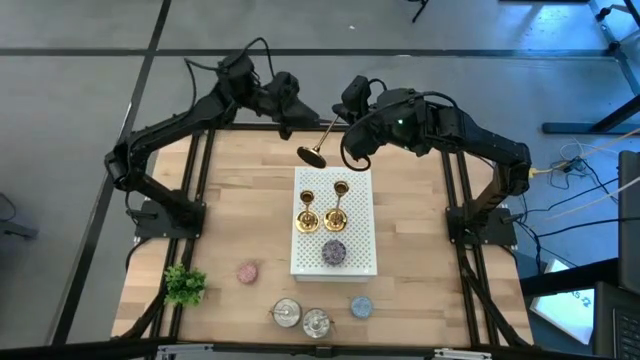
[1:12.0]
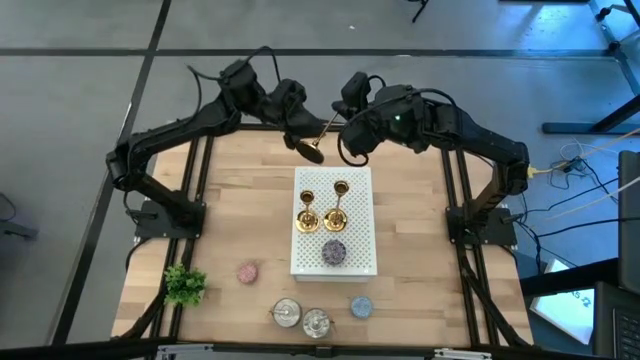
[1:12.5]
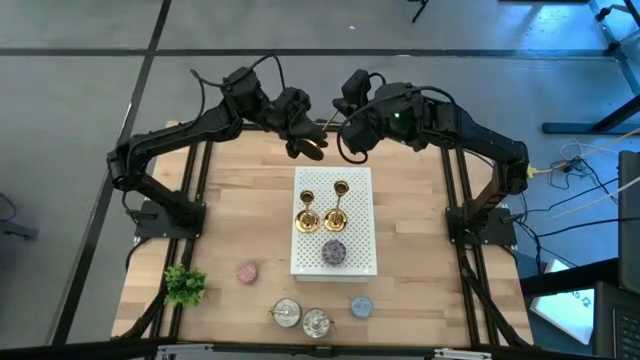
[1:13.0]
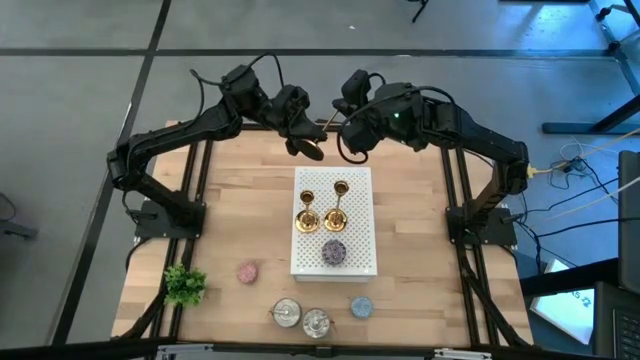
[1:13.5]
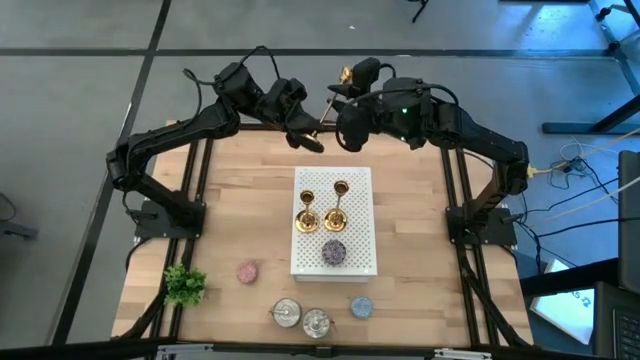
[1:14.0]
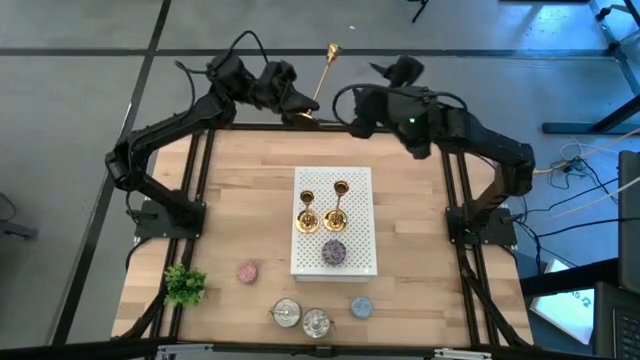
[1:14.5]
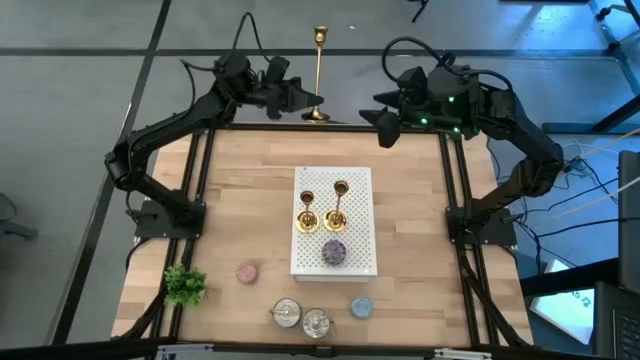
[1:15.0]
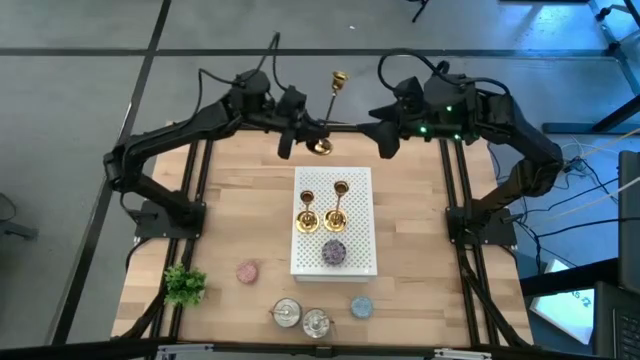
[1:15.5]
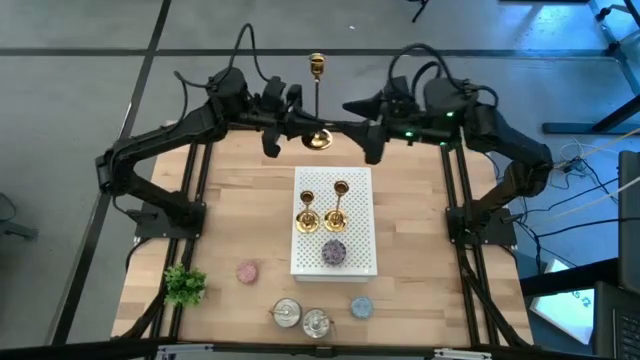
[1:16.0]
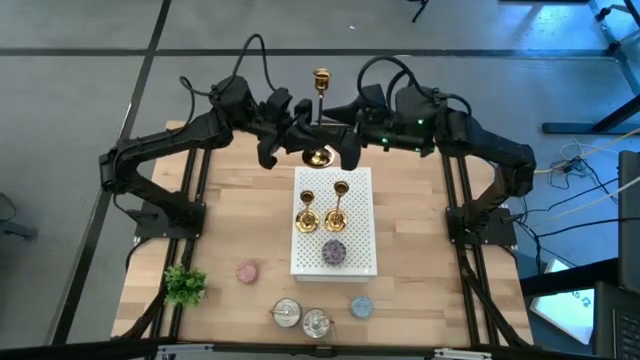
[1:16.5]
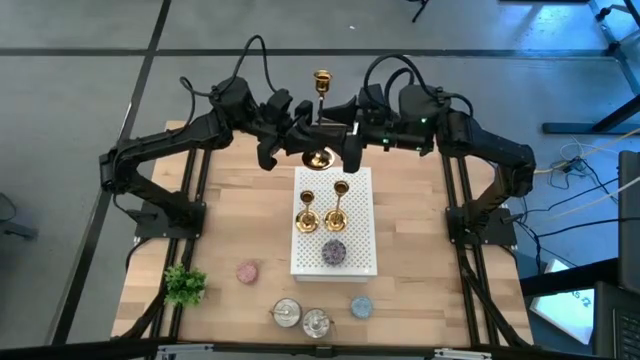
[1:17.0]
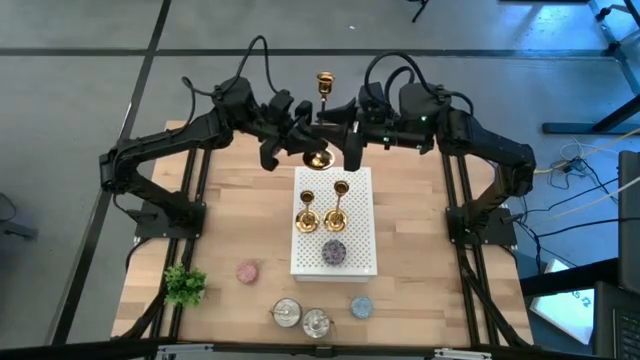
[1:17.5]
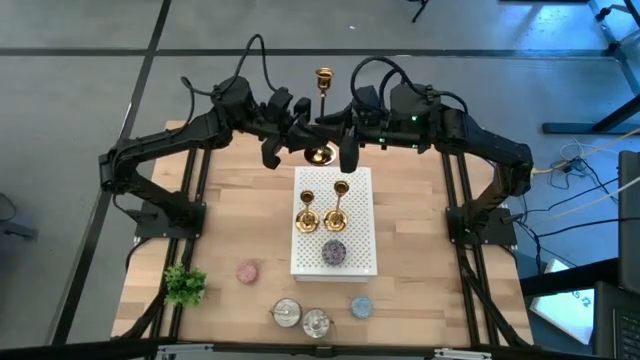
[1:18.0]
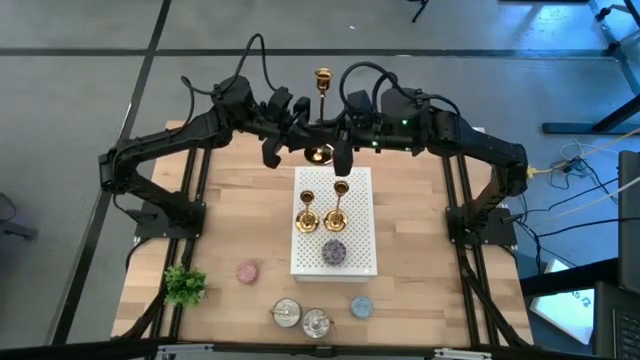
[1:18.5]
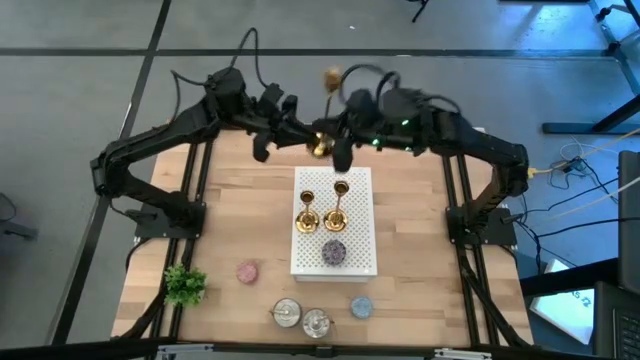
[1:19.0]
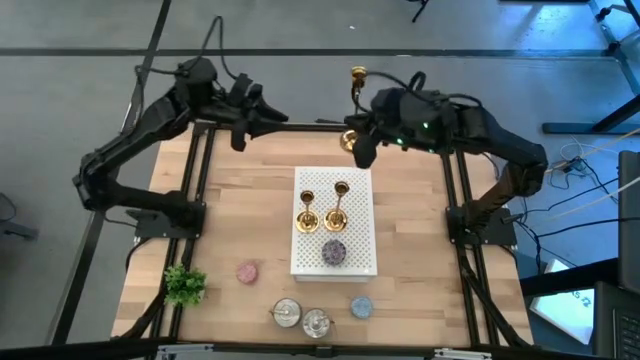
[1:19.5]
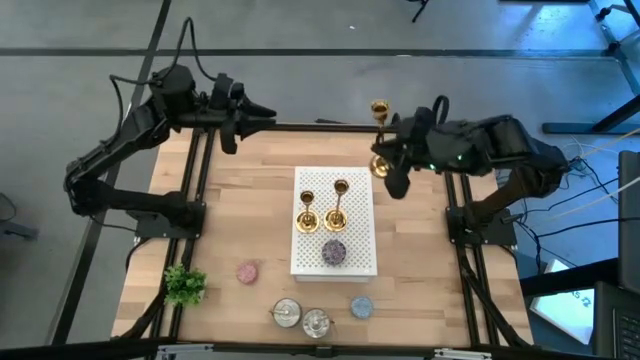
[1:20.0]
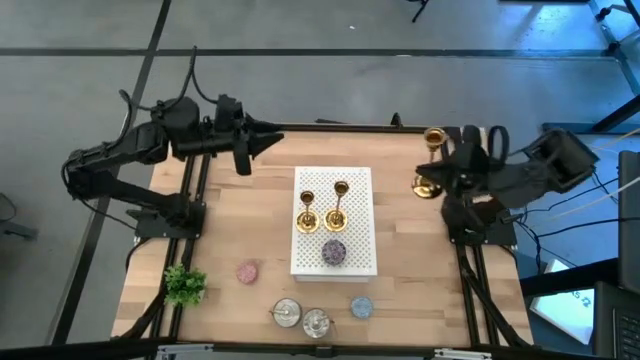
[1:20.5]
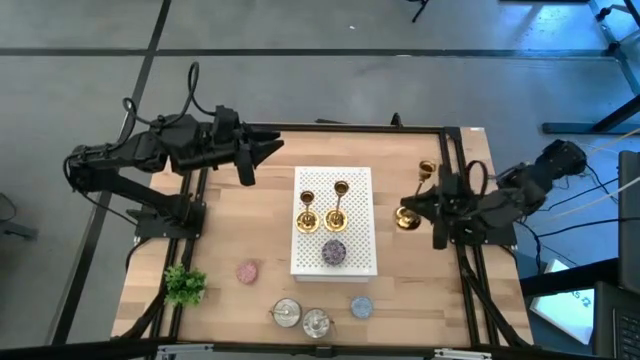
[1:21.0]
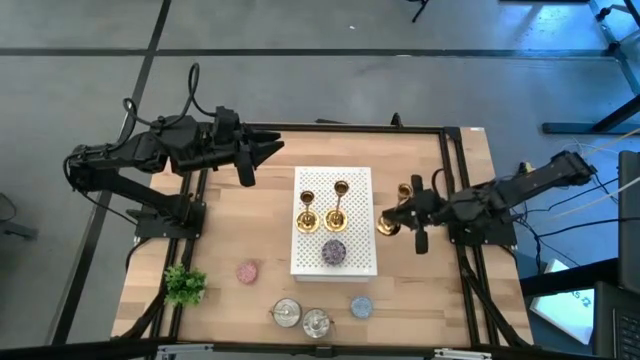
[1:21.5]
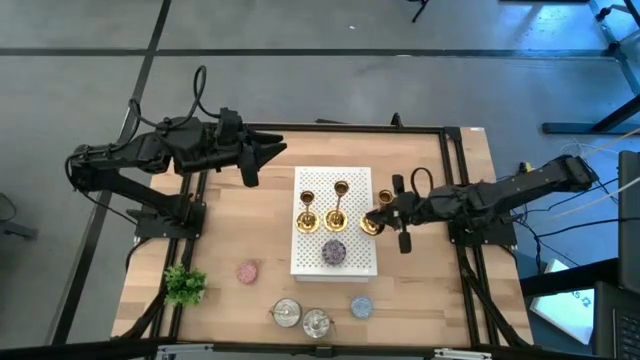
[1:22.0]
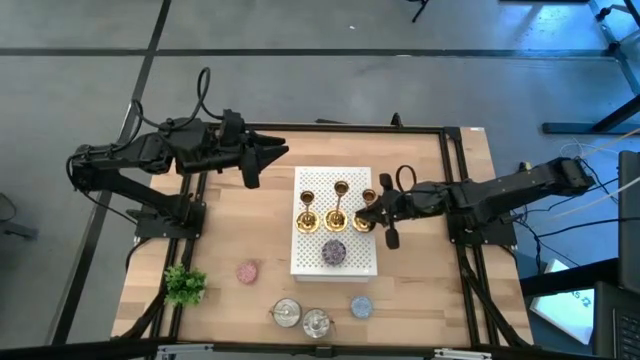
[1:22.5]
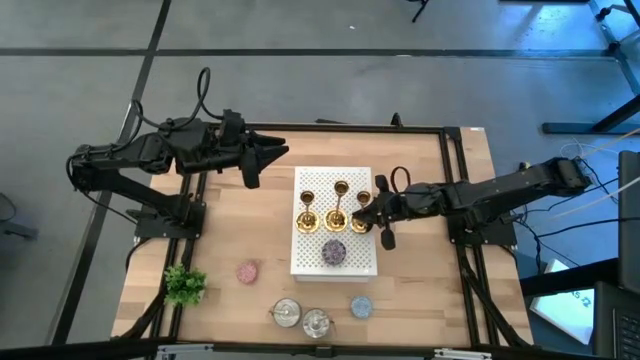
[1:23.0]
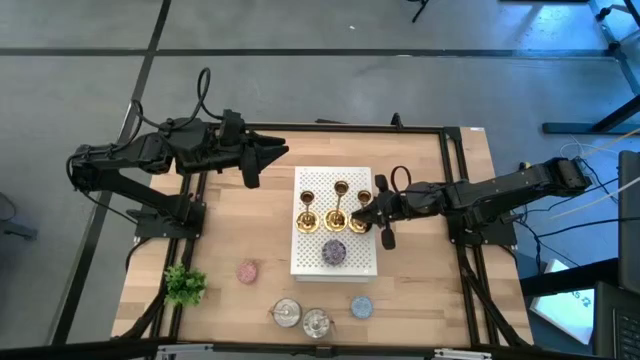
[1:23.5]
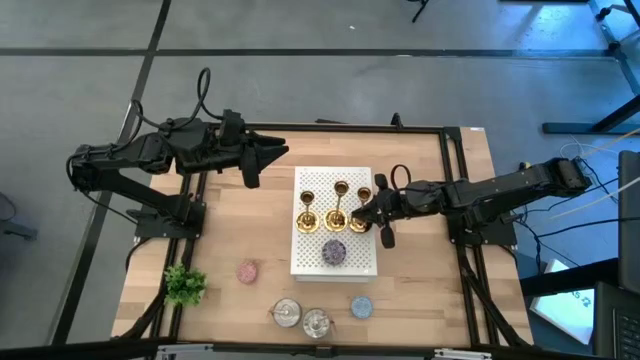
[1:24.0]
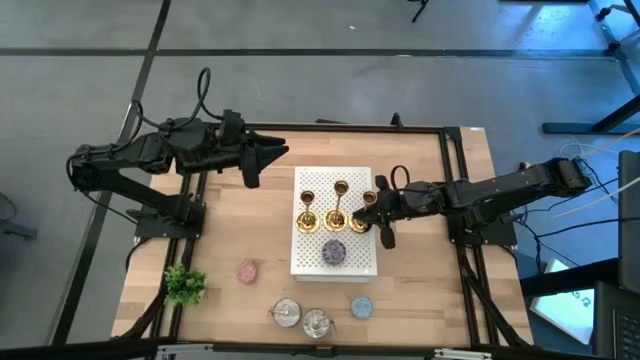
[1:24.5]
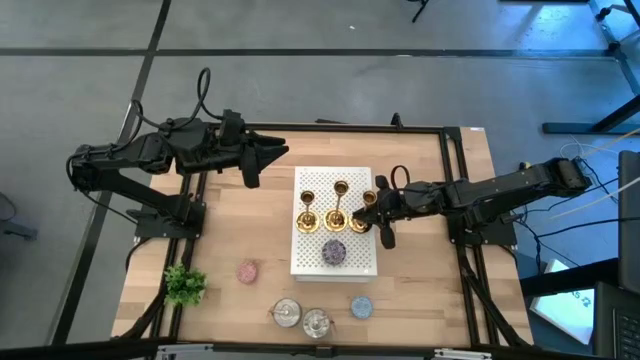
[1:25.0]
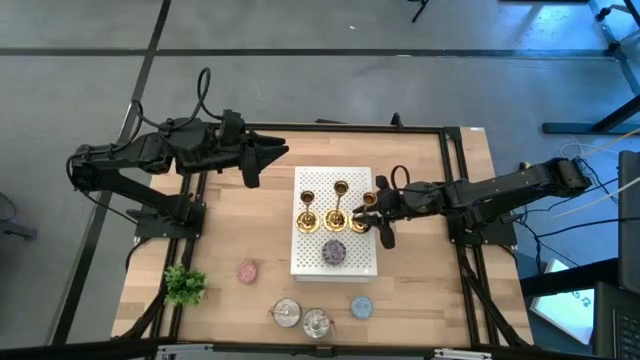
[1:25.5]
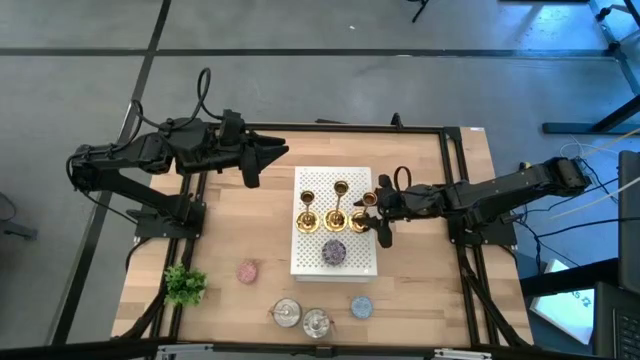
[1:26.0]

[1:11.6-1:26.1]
Task: Pick & Place candle stick holders
Put the gold candle holder on the shelf aligned with the other gold candle holders

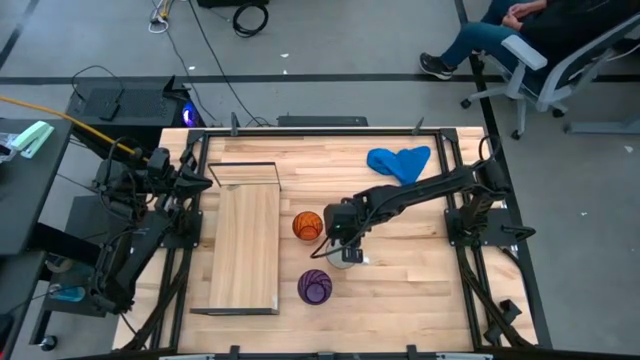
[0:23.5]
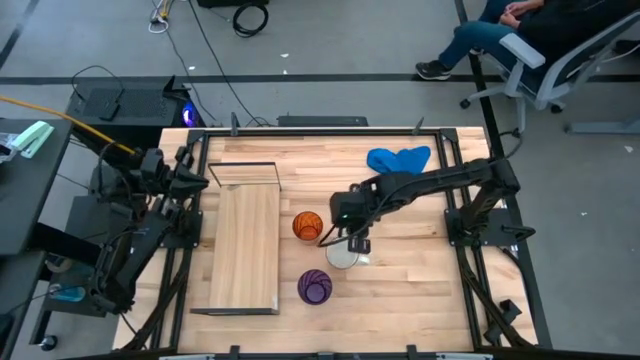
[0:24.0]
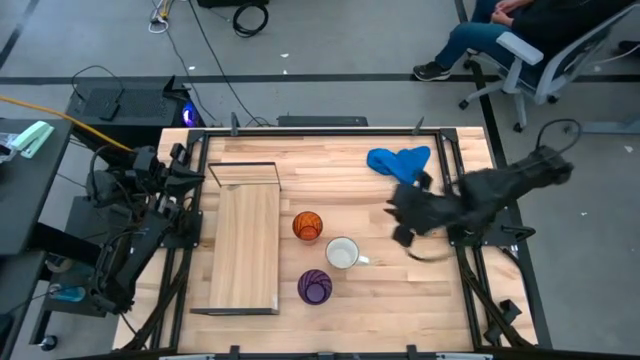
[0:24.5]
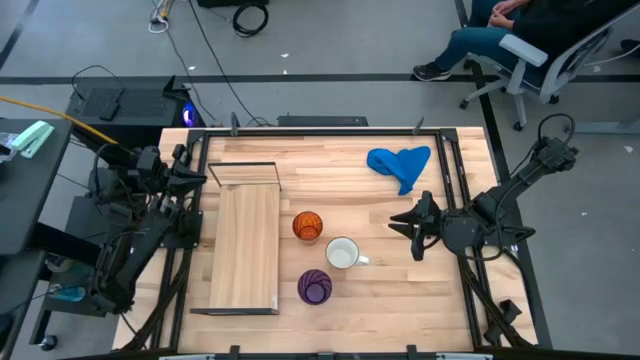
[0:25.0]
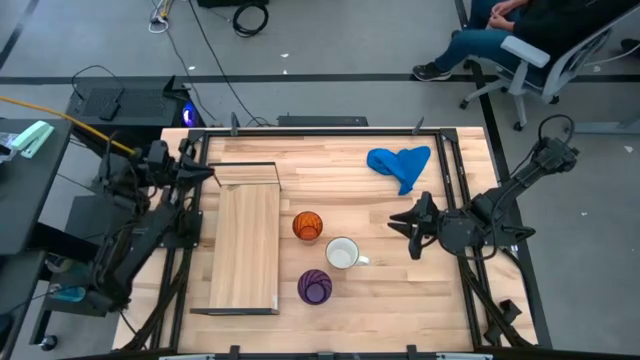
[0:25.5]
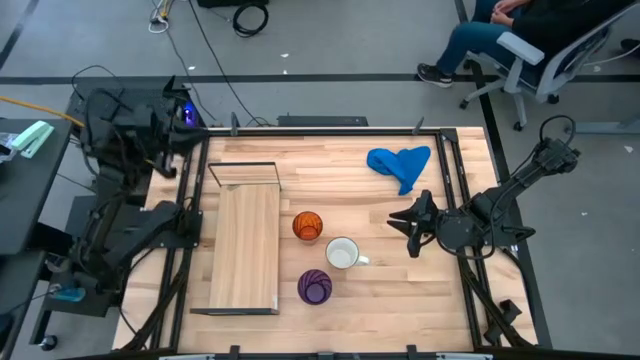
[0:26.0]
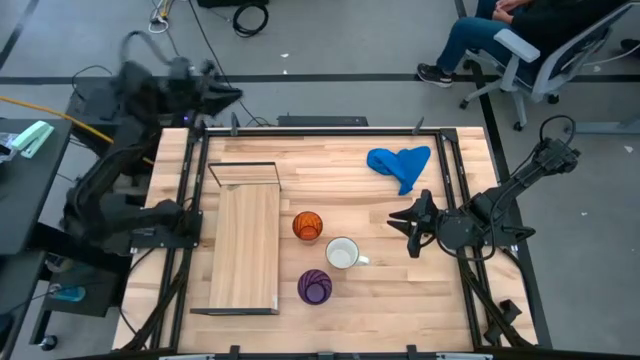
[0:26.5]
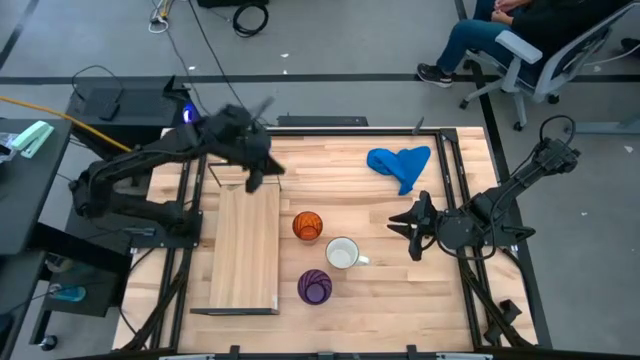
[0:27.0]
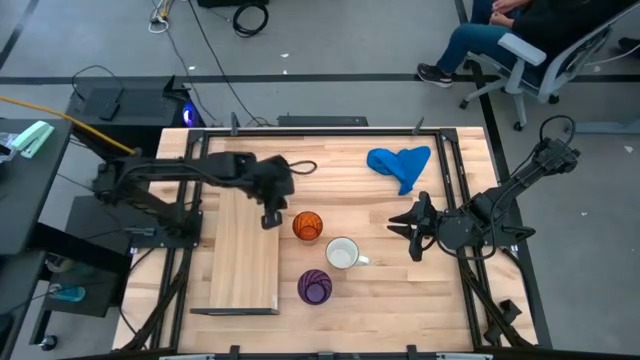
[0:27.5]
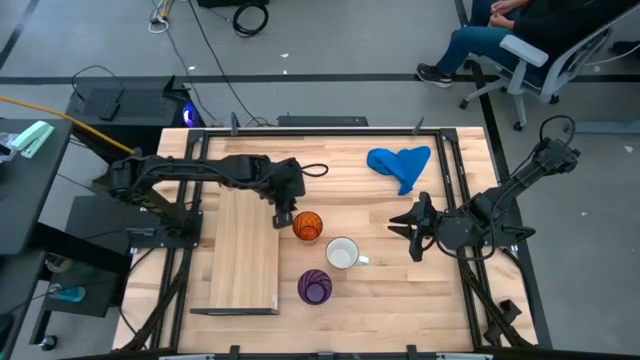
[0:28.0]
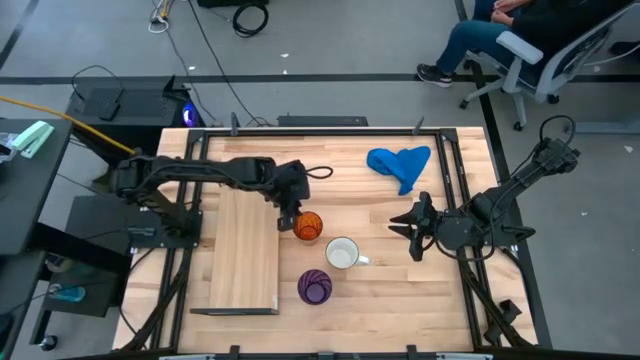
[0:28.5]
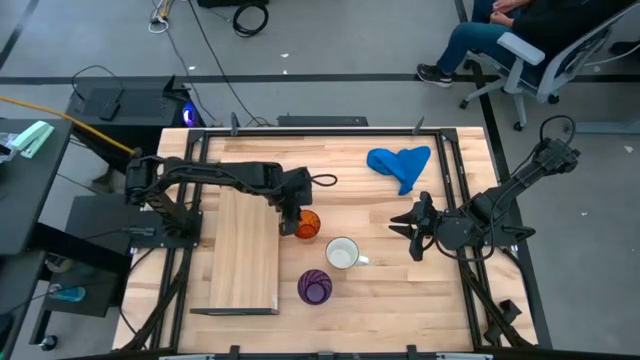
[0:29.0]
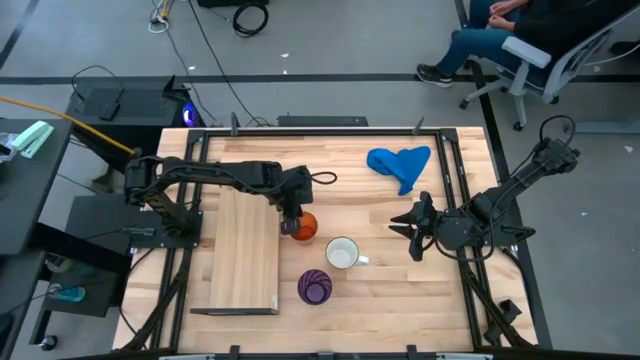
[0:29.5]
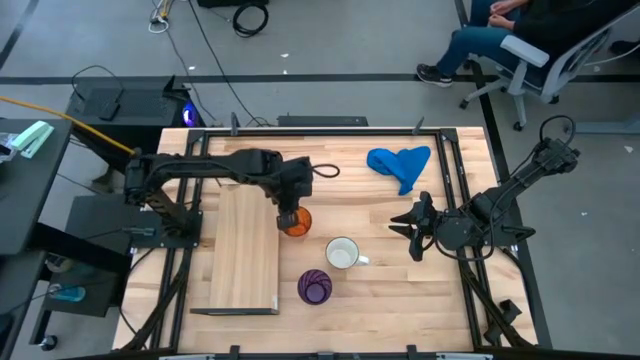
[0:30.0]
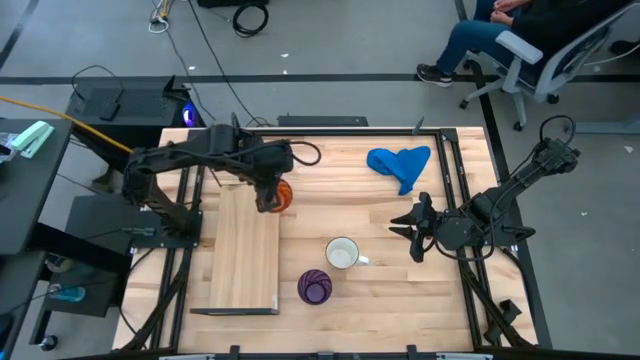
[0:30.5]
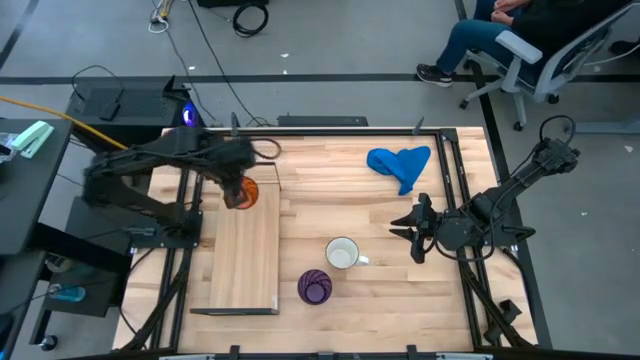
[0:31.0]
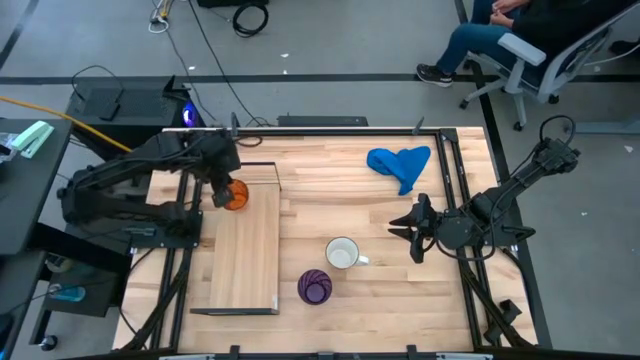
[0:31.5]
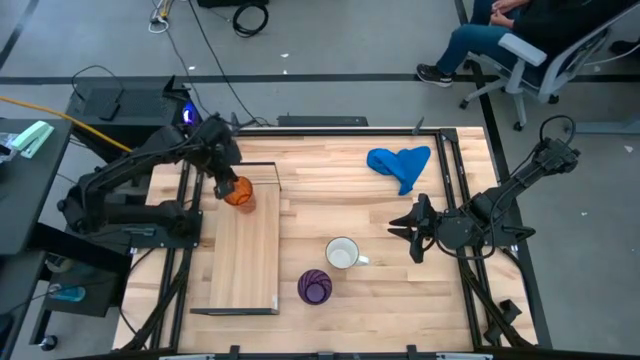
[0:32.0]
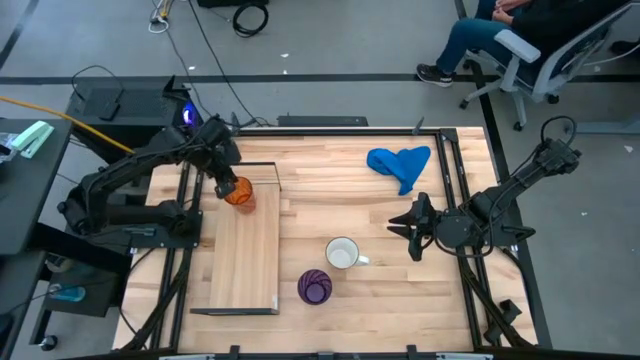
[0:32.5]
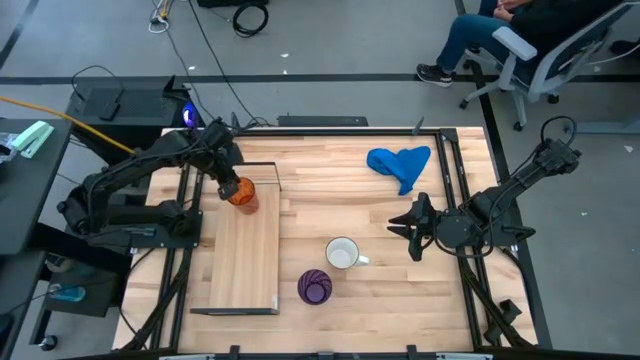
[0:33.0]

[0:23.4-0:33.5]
Task: Stack small to large cups/mugs on shelf
Put the brown cup on the shelf
